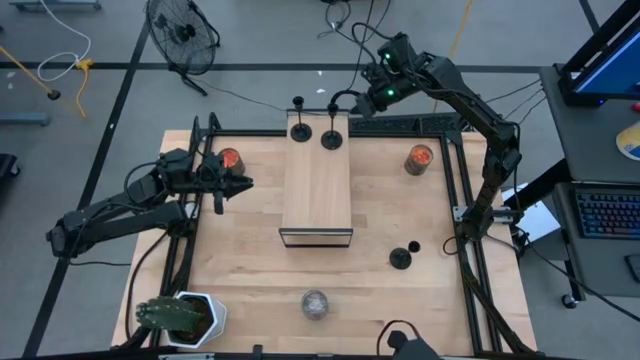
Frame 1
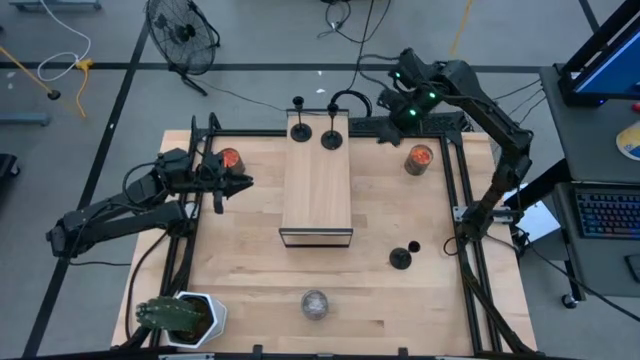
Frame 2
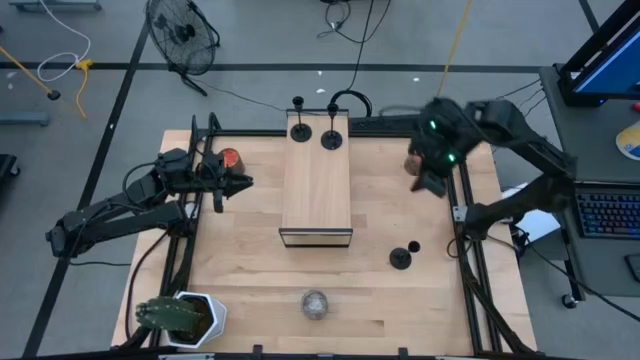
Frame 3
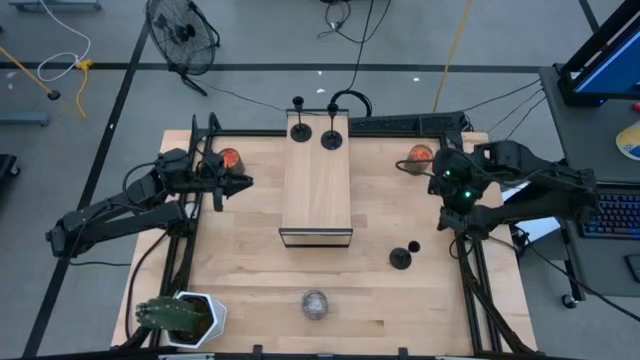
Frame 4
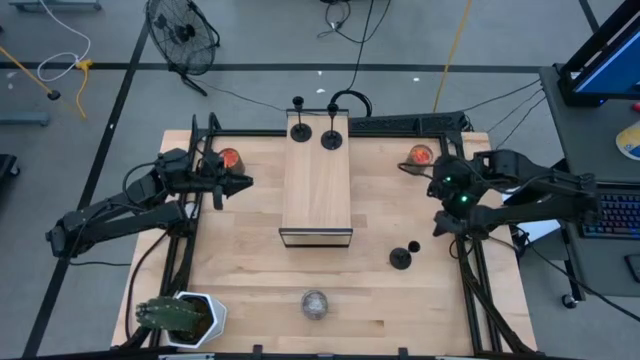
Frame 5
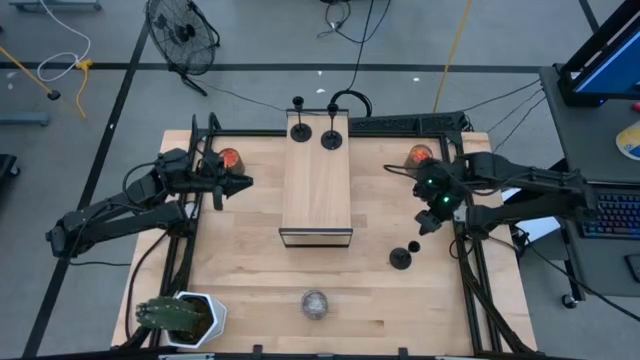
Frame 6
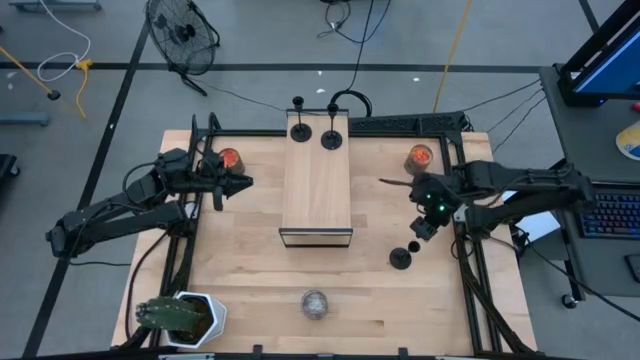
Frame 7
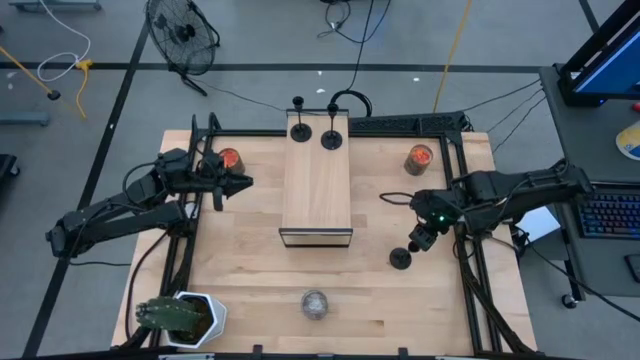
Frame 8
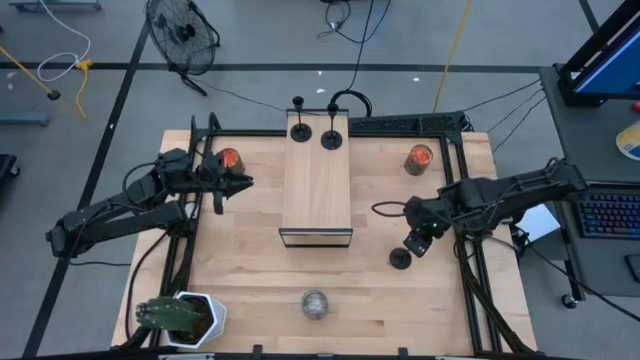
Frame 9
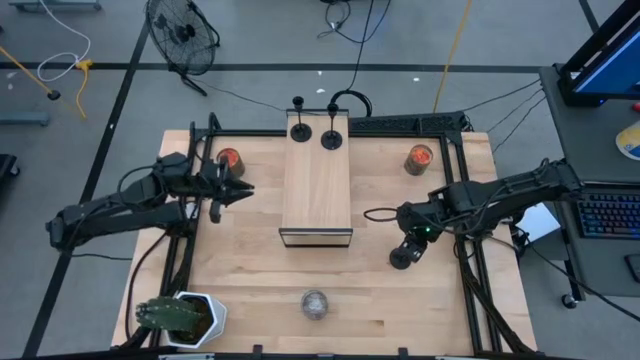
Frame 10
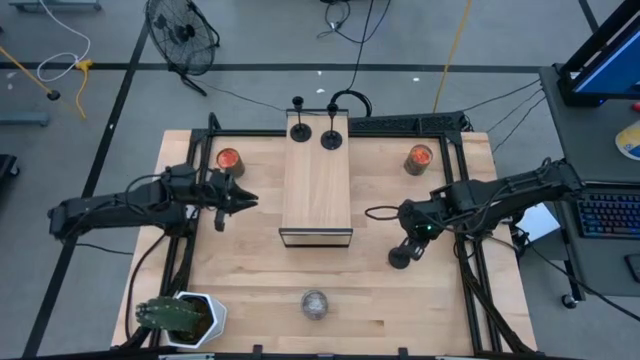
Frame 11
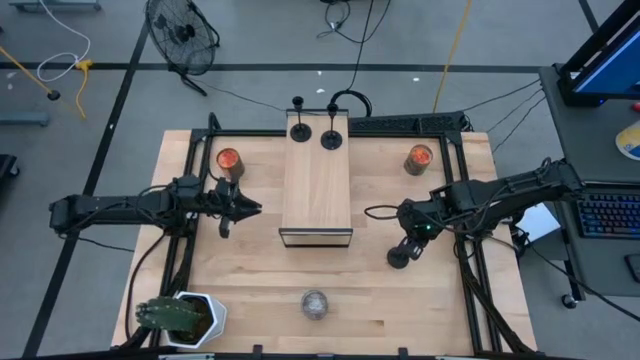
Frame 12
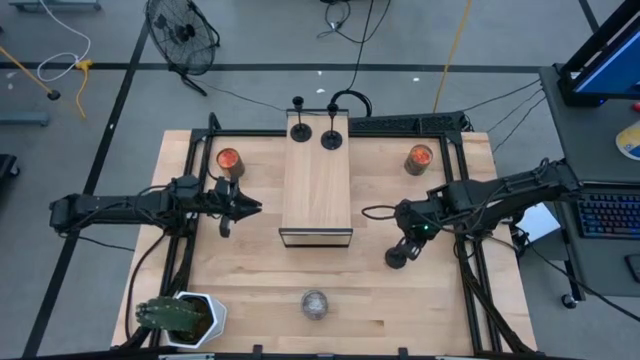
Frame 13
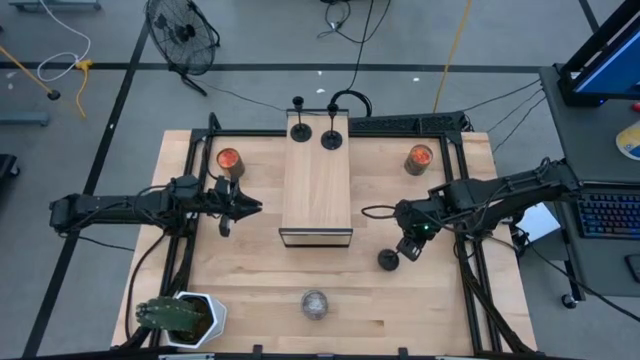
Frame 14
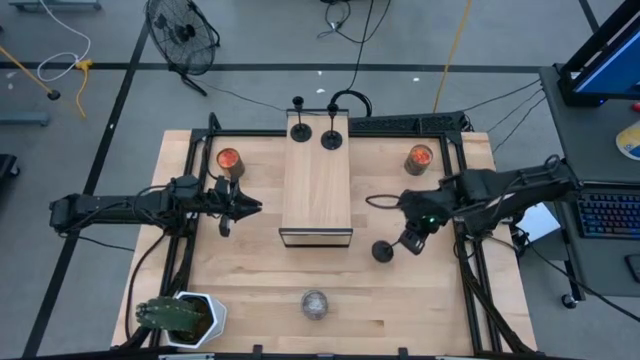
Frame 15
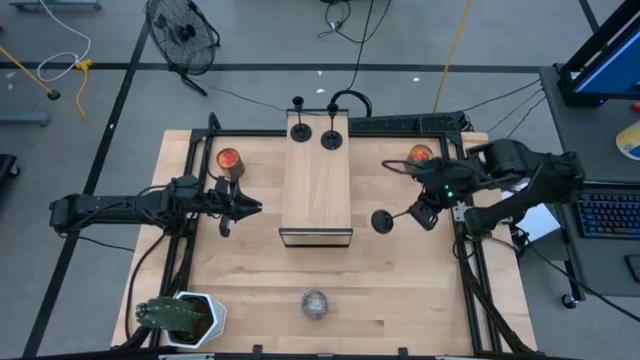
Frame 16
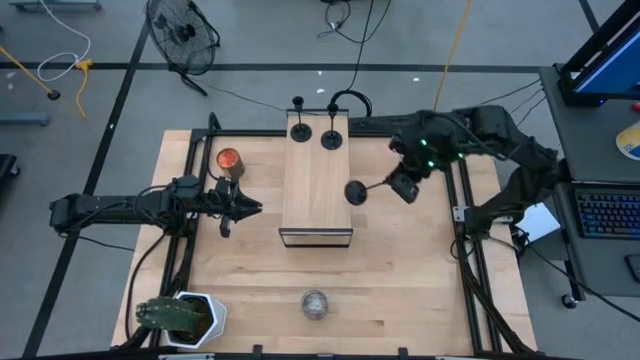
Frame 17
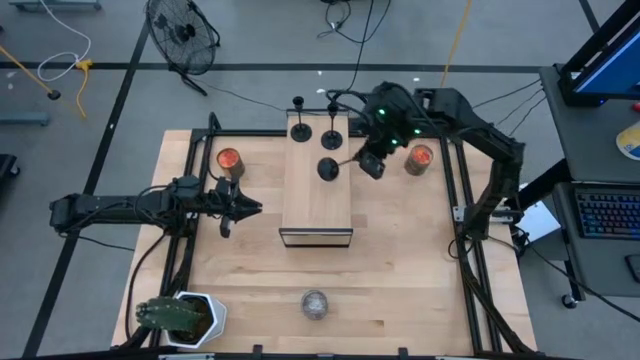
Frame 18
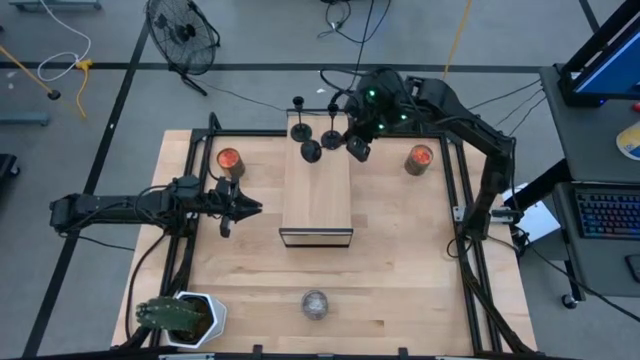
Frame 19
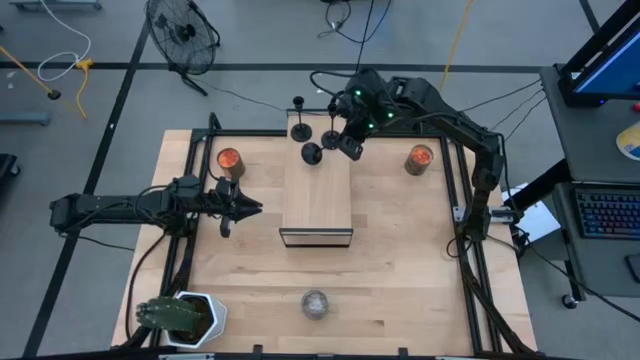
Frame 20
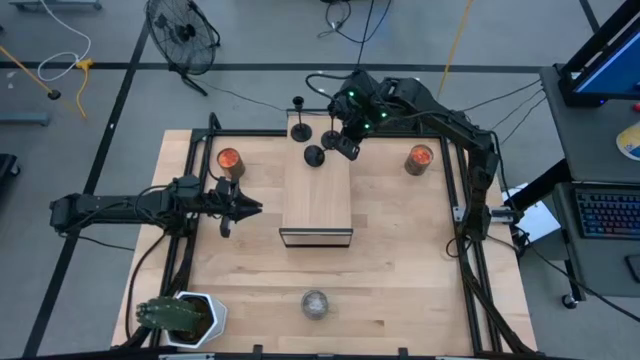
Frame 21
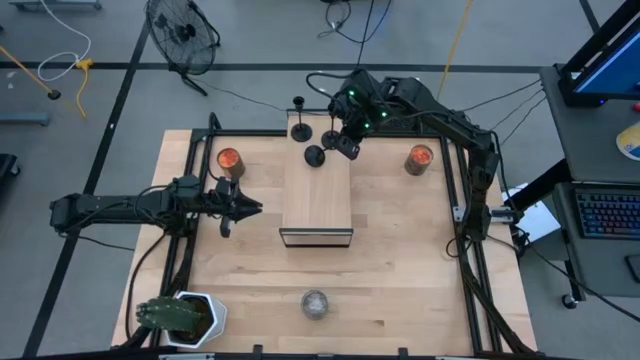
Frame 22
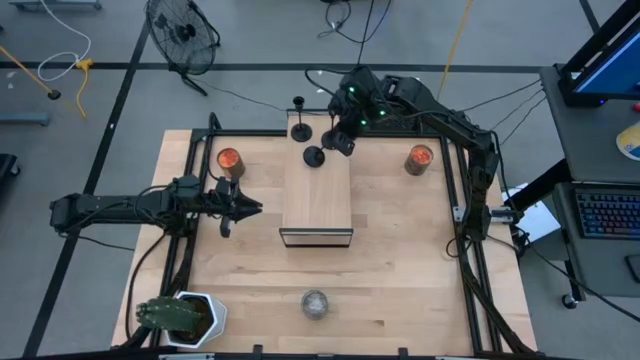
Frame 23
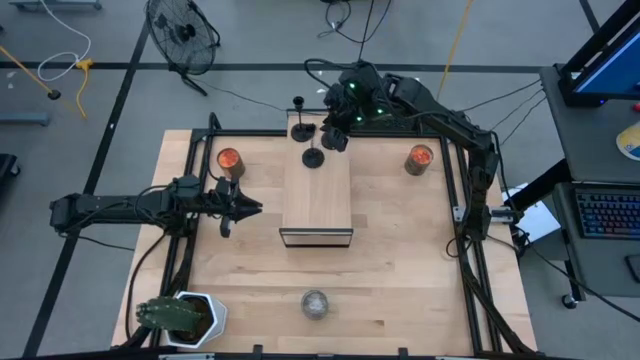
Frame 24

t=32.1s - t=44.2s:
Task: Pick & Place candle stick holders
Put the black candlestick holder on the shelf

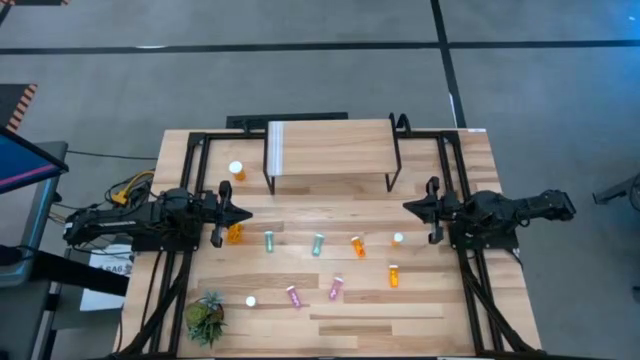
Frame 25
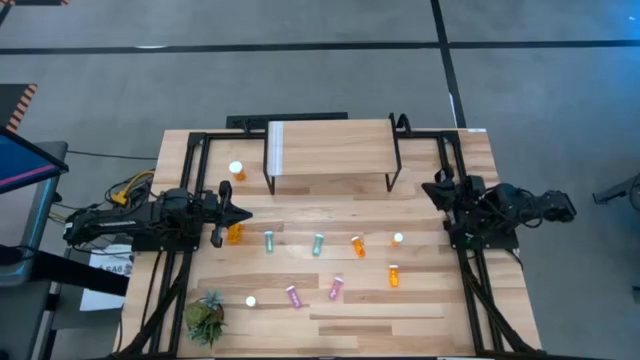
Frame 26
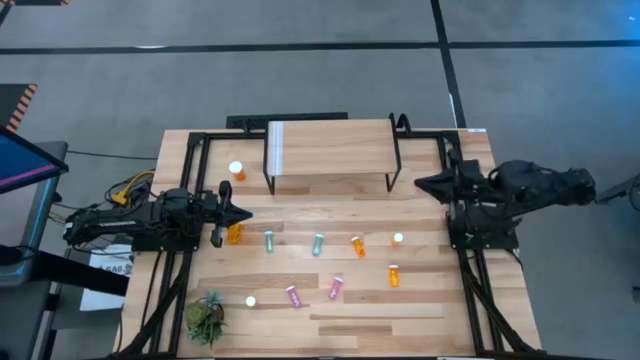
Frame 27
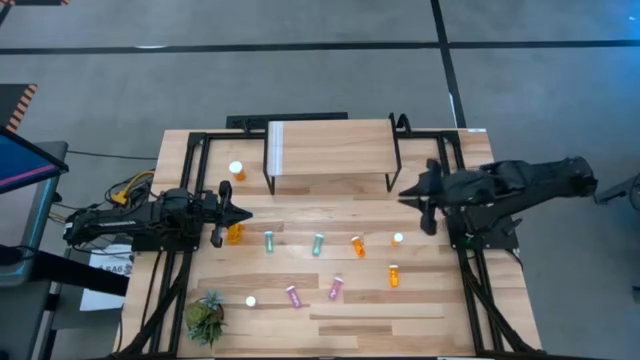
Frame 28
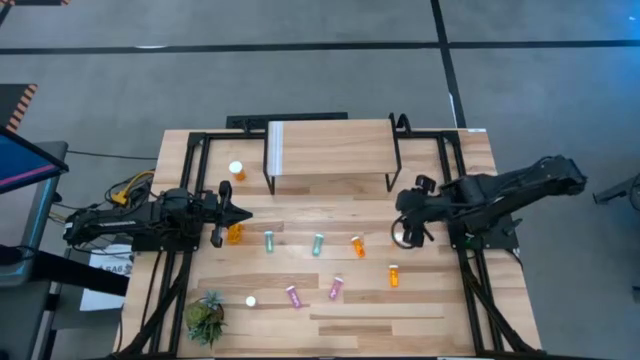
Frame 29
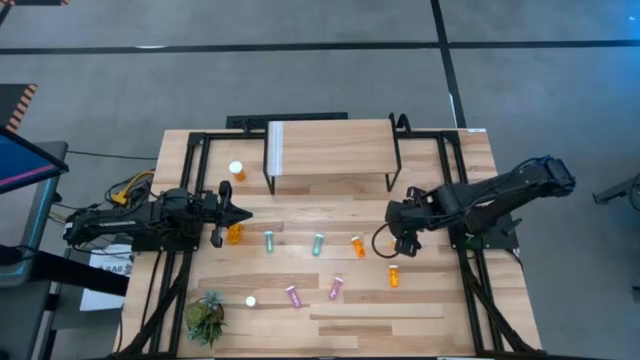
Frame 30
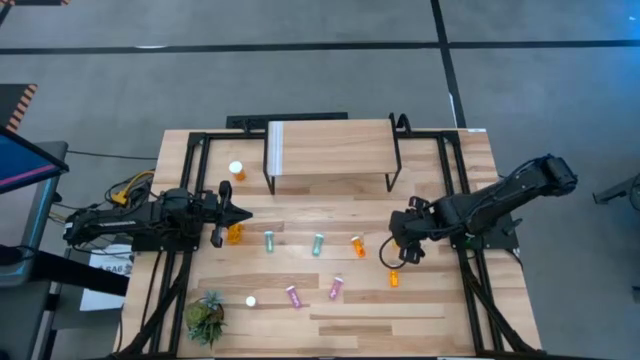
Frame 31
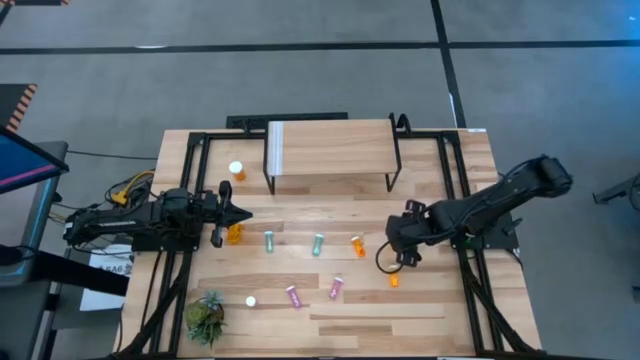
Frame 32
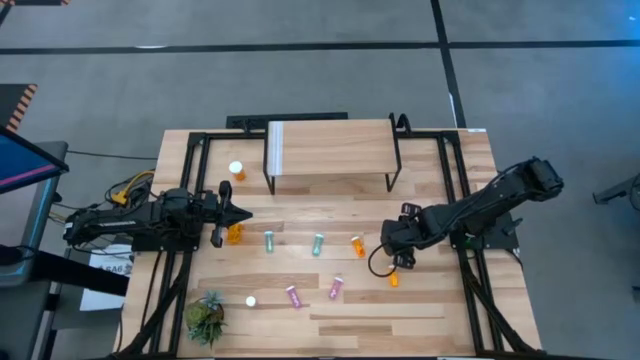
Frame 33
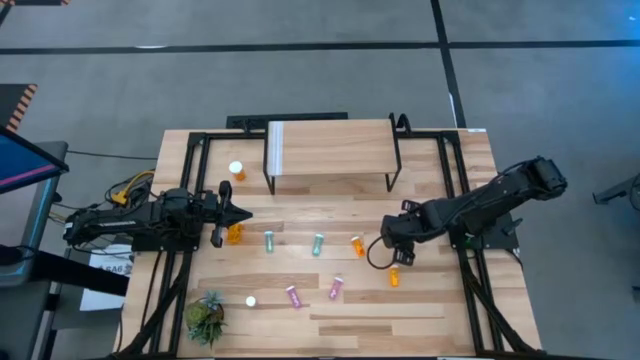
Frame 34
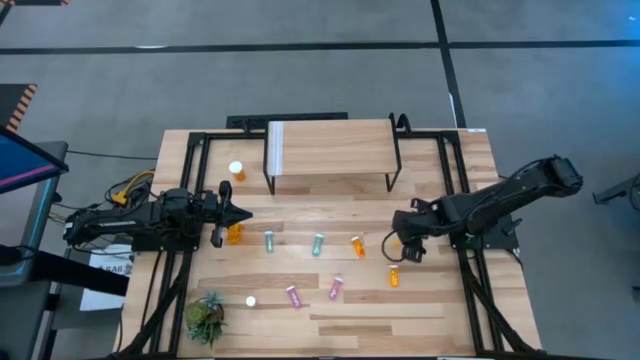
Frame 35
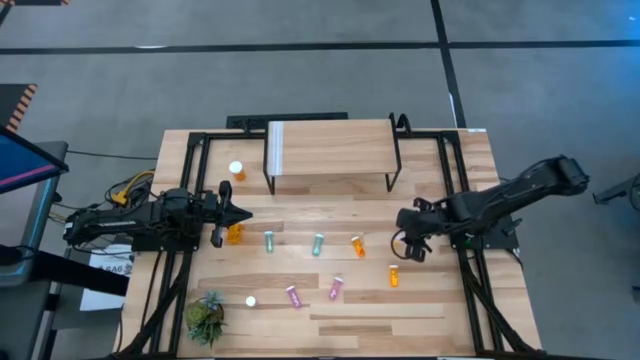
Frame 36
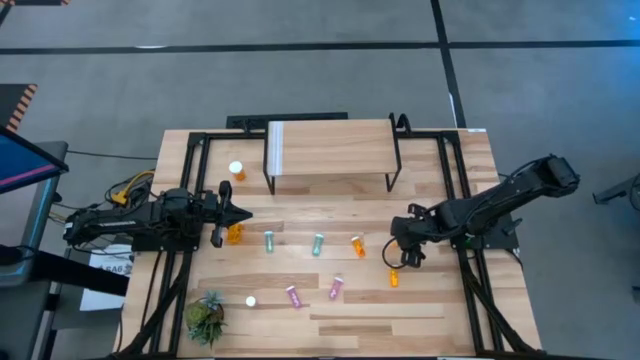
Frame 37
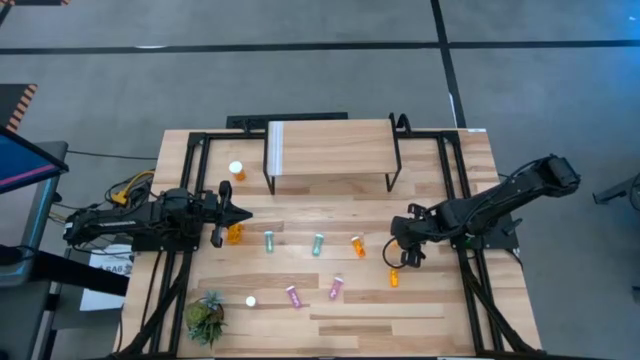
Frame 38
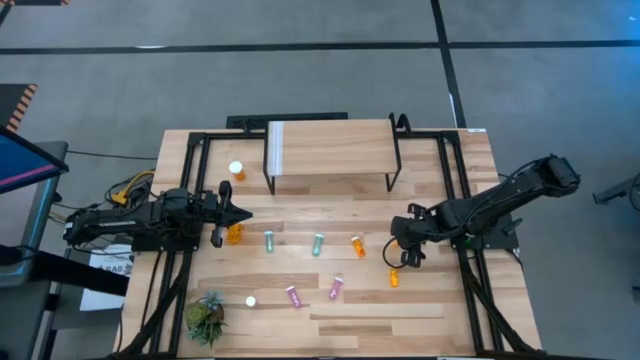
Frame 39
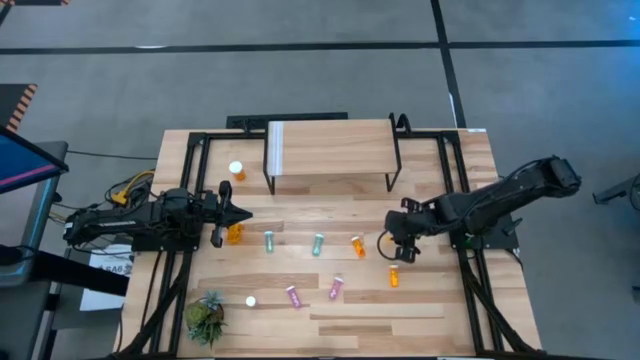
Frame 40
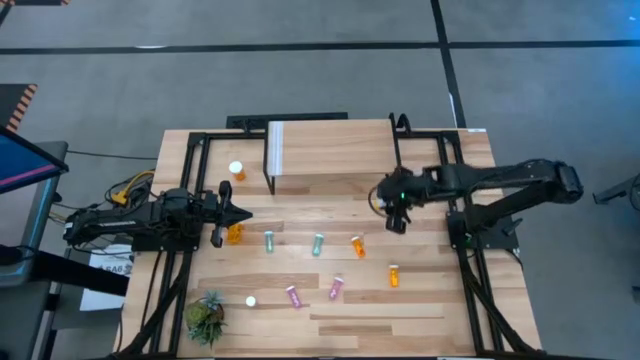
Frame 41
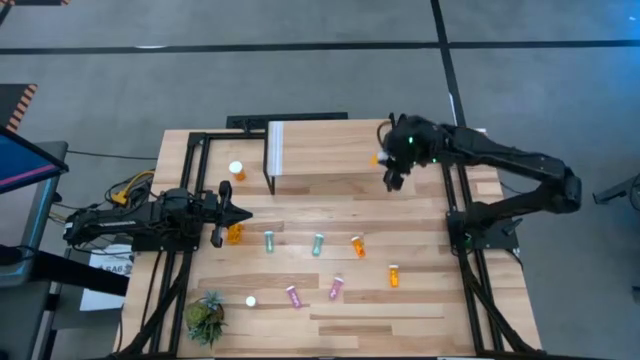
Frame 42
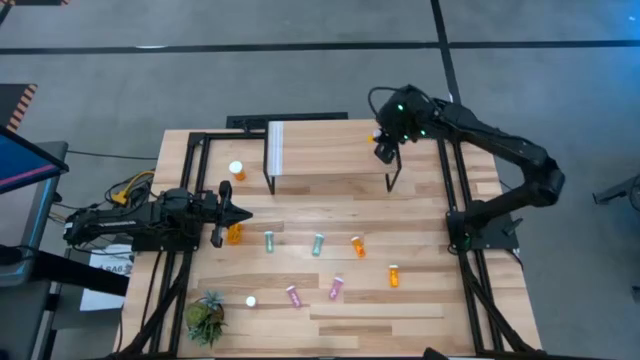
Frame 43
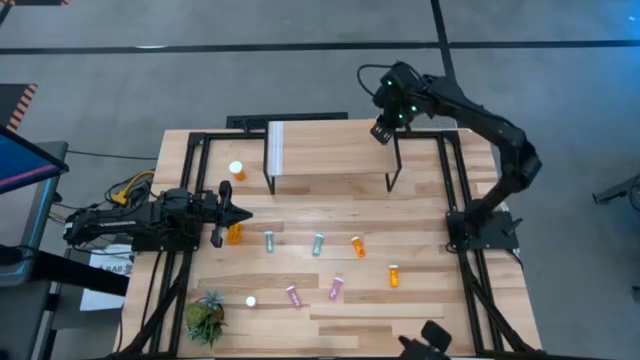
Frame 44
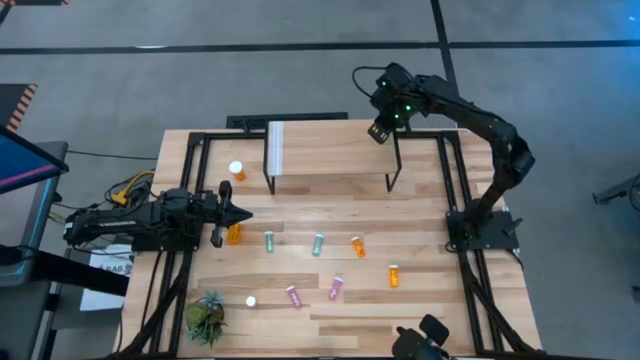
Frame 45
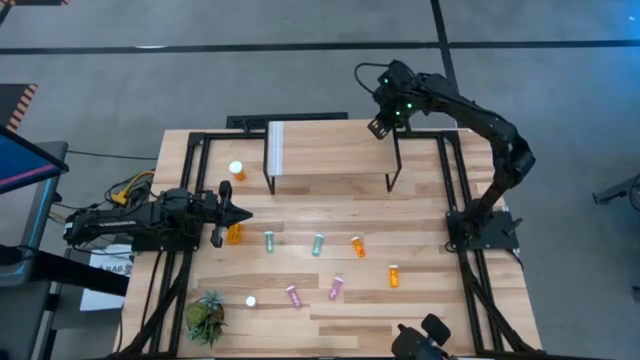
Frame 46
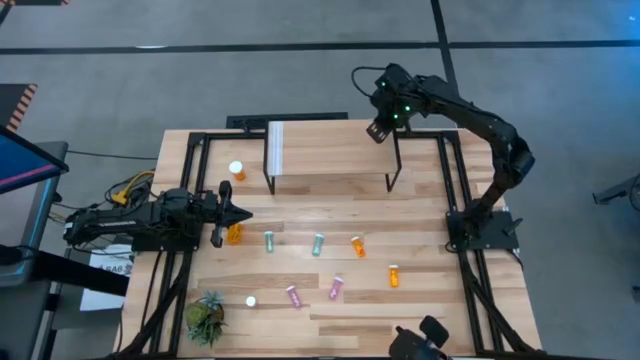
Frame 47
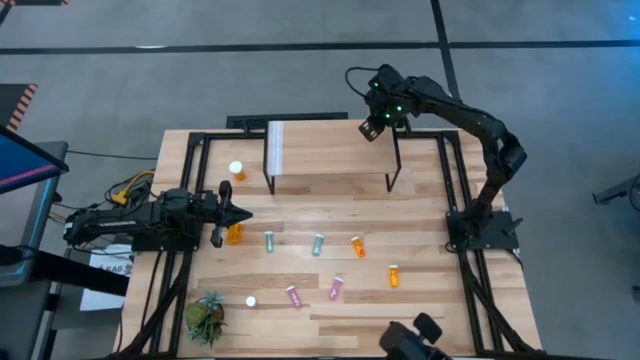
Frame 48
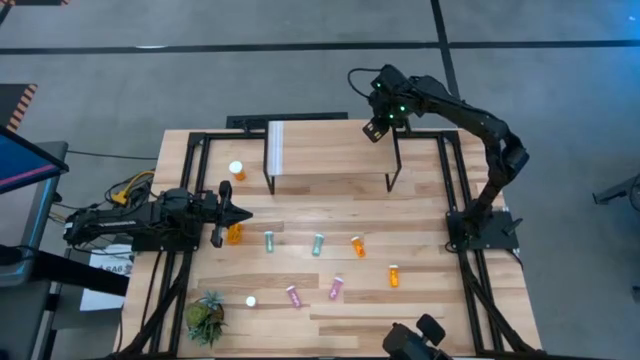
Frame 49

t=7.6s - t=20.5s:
Task: Pick and place medicine bottles onto shelf by color
Put the top right small orange pill bottle on the shelf
